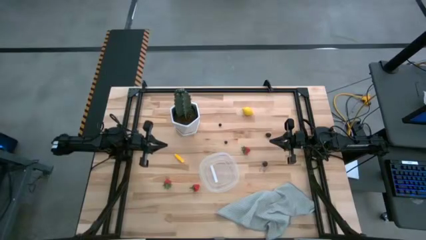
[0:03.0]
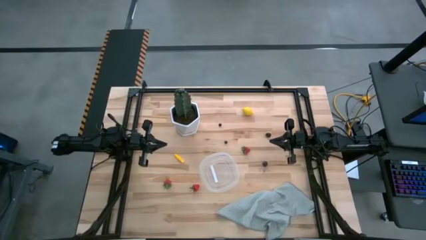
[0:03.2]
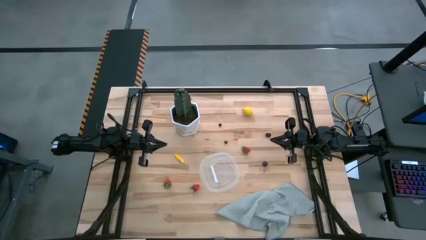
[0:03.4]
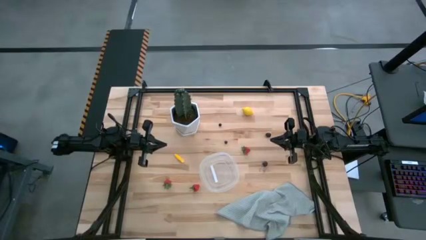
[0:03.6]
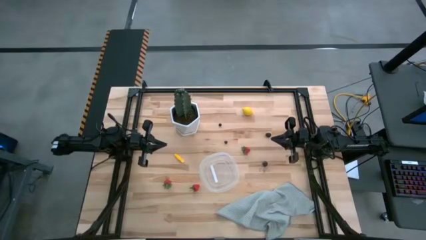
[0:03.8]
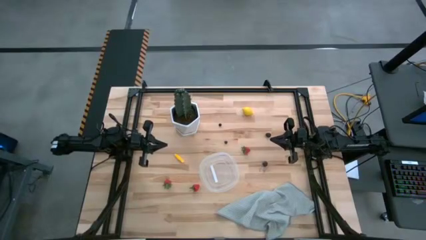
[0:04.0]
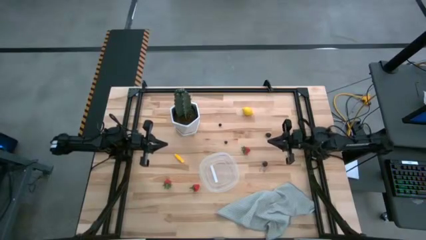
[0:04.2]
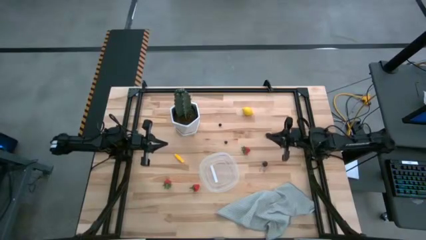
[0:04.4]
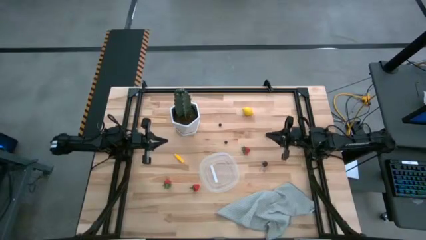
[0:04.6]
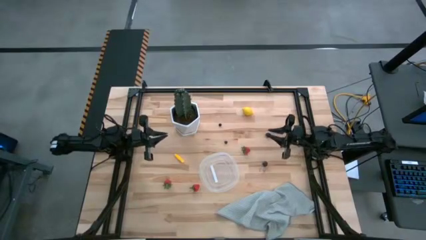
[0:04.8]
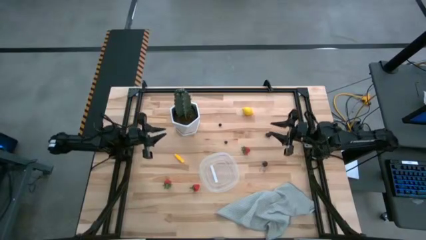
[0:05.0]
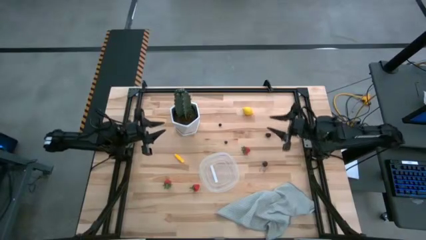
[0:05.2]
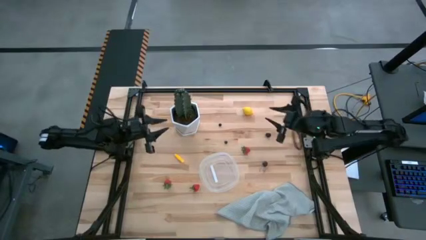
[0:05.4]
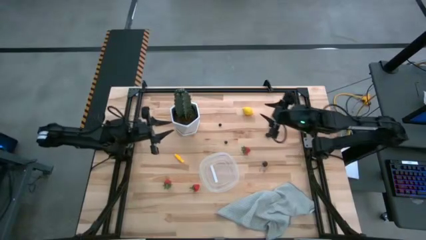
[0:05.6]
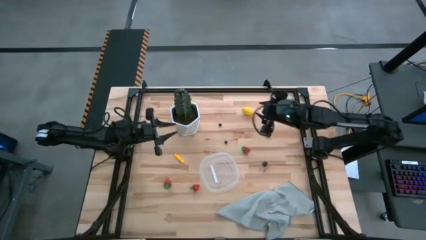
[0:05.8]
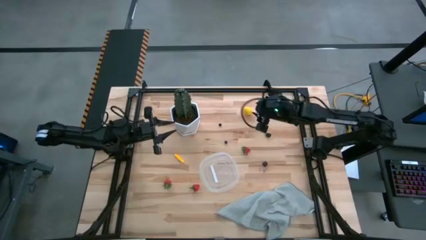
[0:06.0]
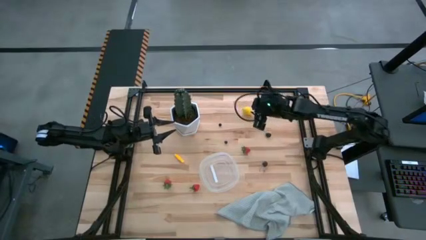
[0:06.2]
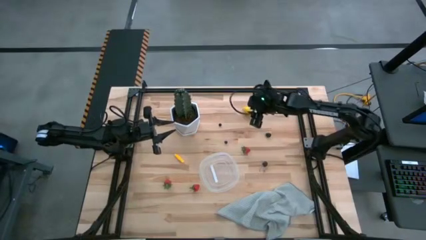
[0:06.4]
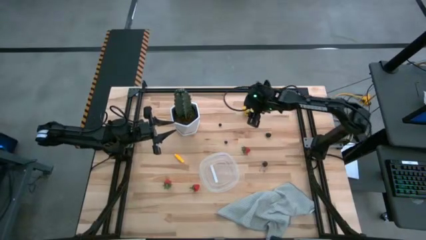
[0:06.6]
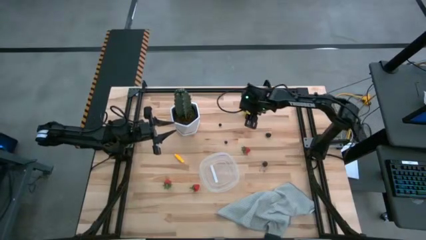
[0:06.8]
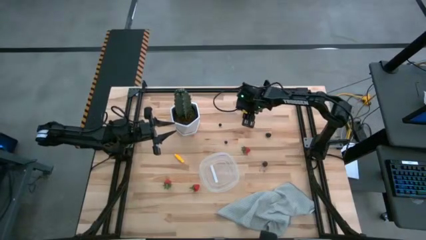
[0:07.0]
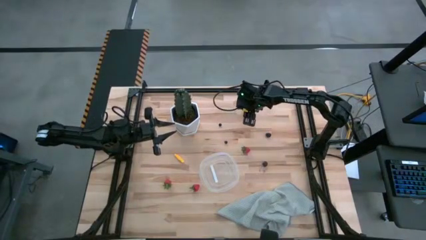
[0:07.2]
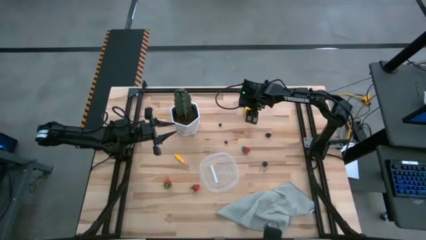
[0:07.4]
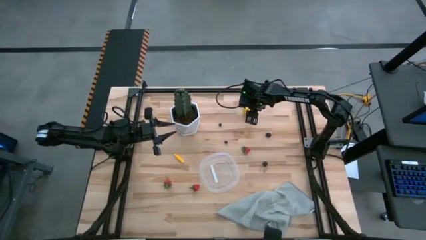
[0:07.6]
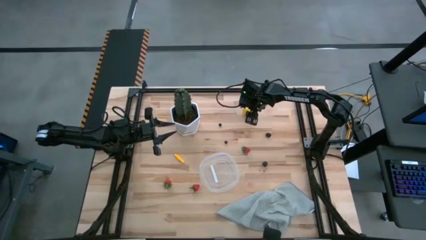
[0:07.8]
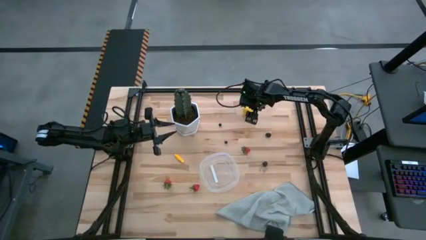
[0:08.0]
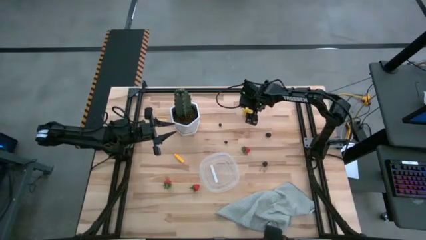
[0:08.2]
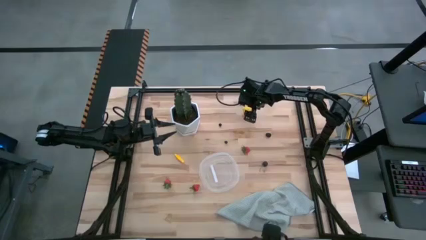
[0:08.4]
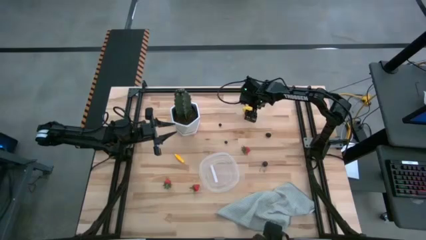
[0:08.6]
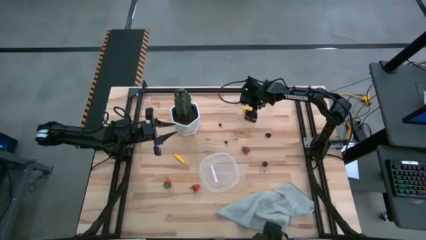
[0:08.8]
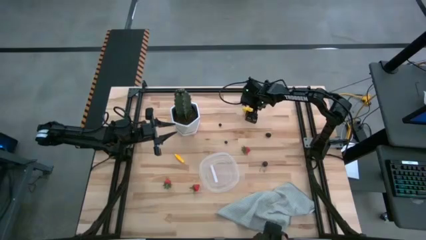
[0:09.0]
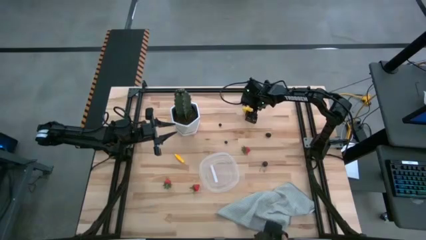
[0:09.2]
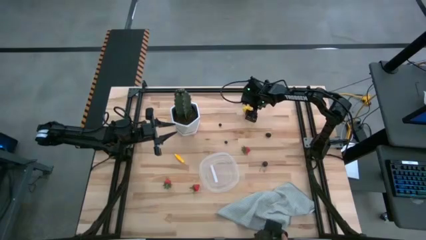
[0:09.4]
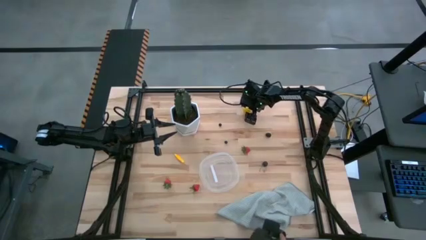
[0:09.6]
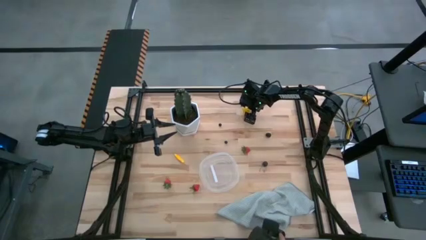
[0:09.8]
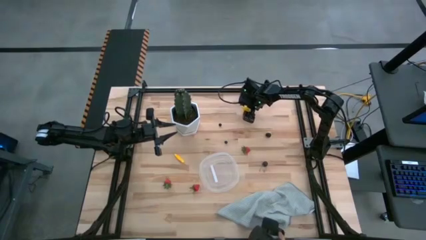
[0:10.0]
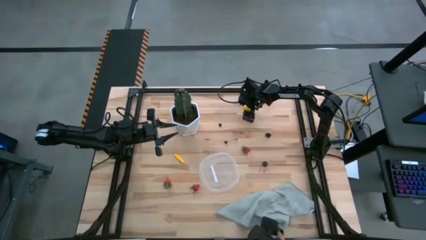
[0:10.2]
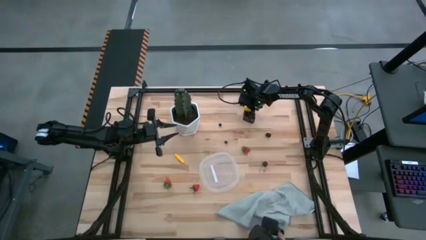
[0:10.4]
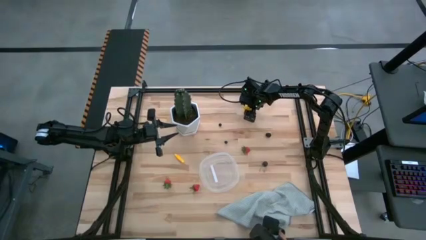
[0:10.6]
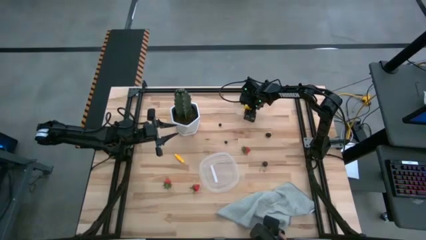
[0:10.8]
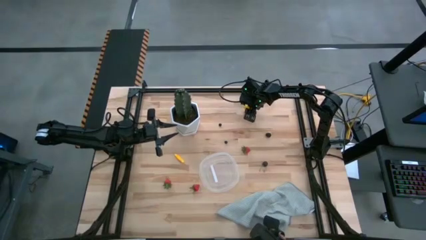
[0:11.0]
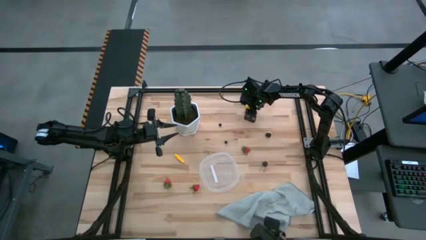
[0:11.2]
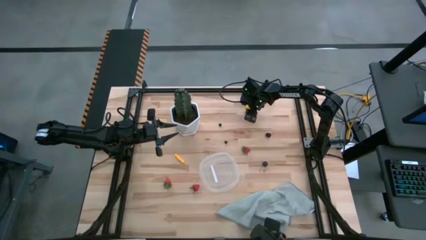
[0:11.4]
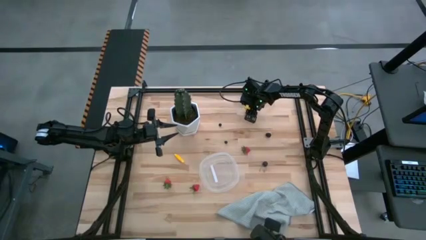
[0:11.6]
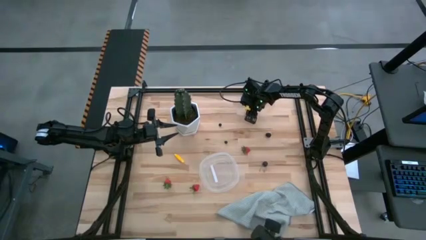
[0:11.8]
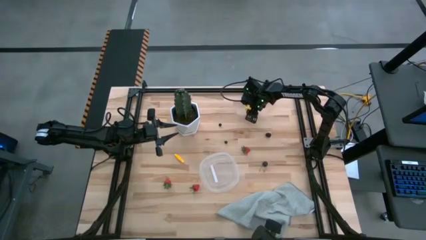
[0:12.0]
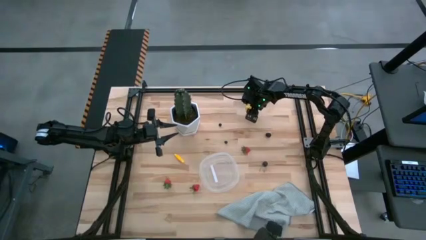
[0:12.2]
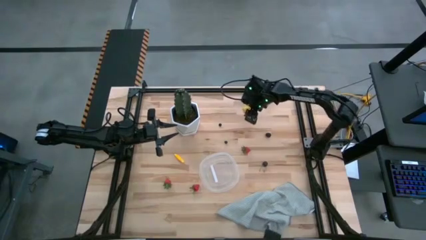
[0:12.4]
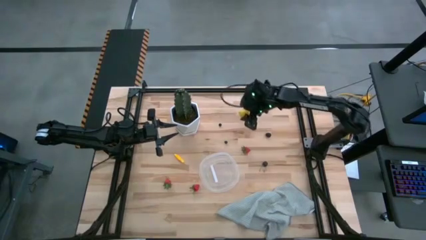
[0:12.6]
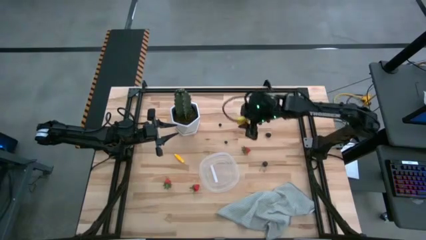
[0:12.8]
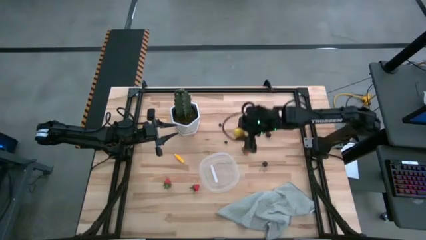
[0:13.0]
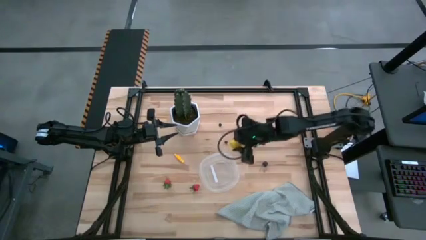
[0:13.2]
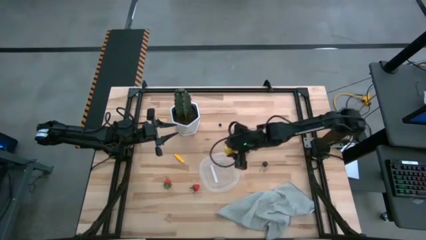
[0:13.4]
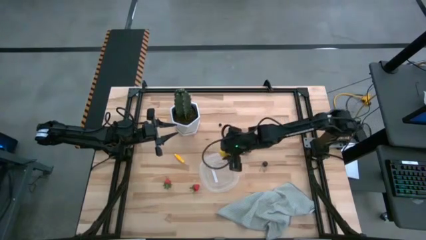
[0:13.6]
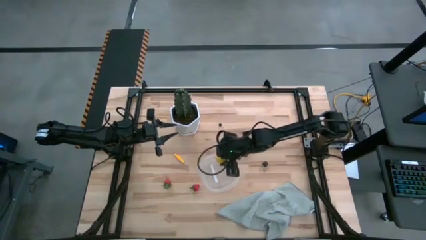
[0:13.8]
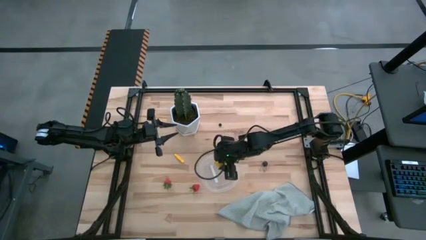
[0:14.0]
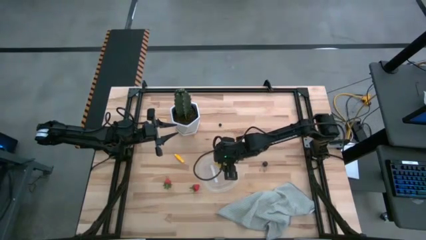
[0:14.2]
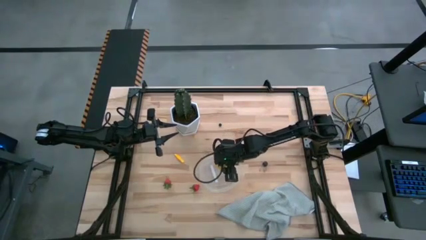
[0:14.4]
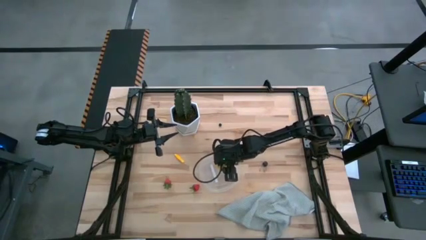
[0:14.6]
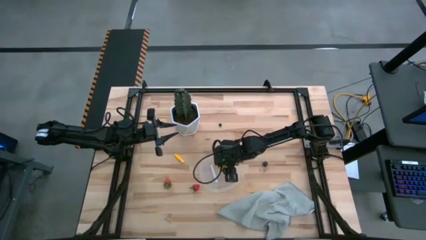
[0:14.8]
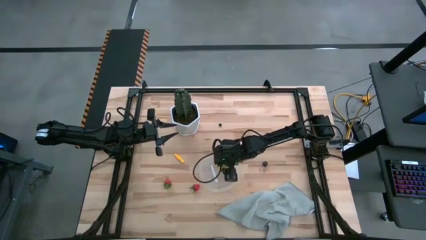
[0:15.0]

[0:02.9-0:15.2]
Task: Pick and placing Produce into tupperware
Put the yellow lemon into the transparent container

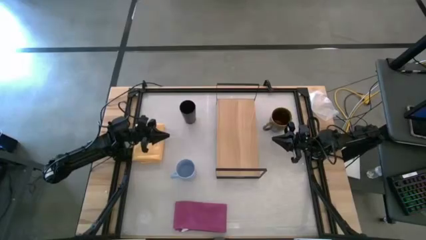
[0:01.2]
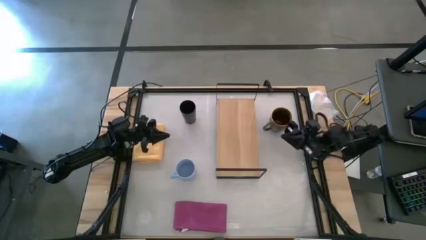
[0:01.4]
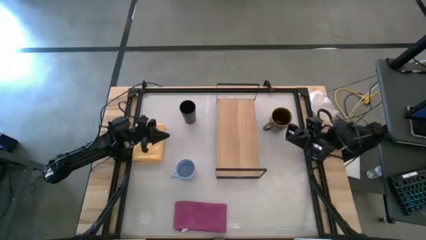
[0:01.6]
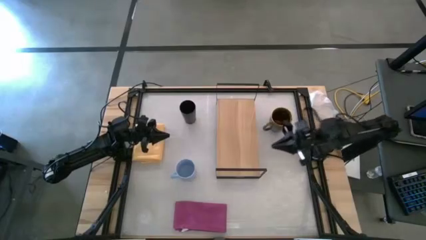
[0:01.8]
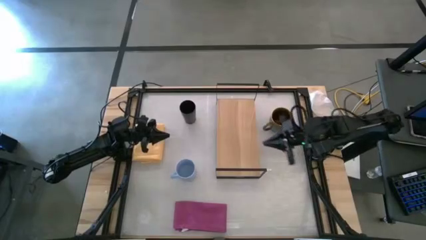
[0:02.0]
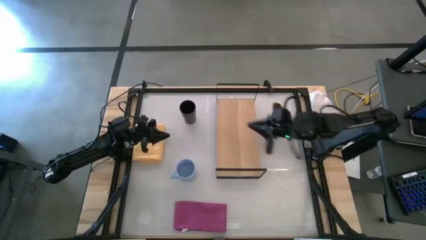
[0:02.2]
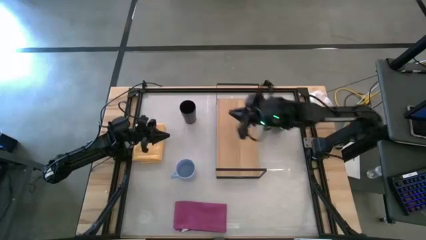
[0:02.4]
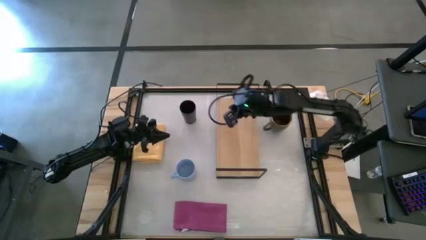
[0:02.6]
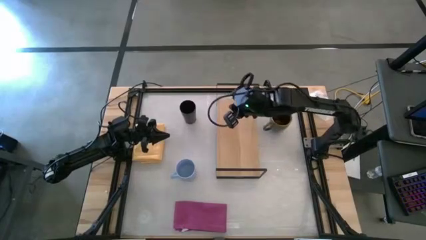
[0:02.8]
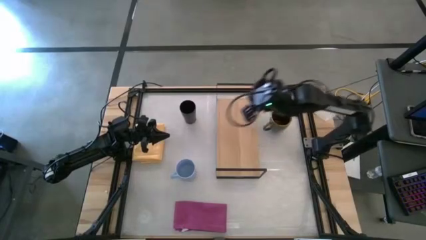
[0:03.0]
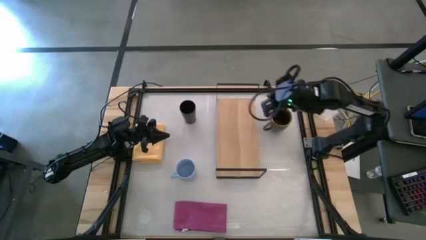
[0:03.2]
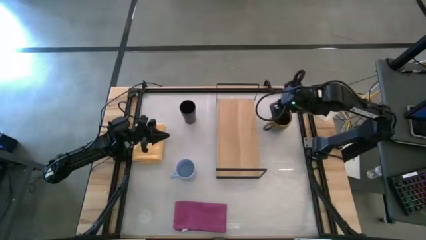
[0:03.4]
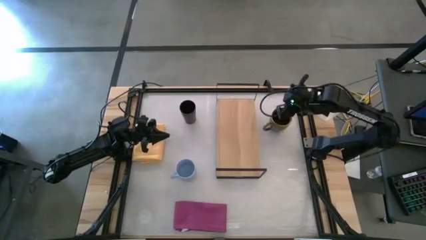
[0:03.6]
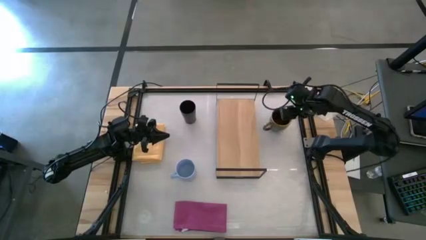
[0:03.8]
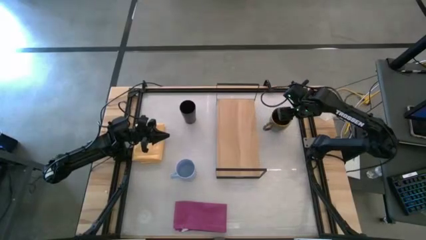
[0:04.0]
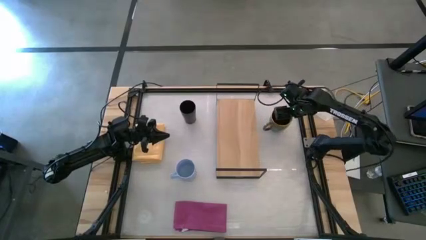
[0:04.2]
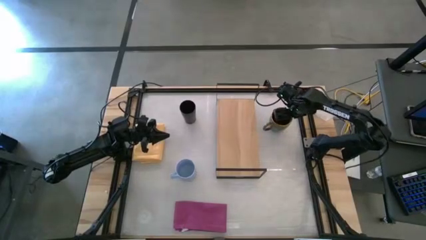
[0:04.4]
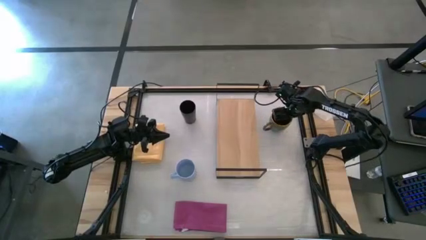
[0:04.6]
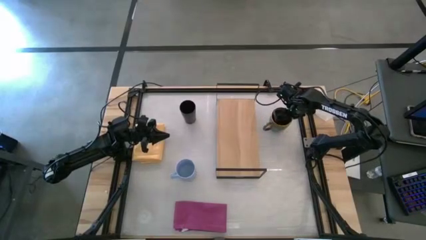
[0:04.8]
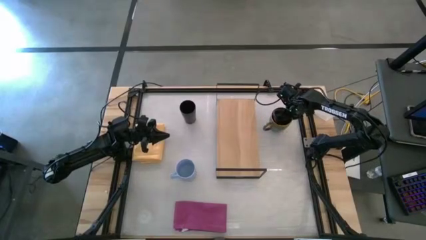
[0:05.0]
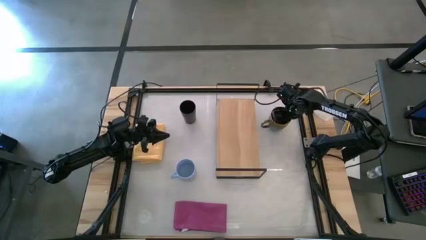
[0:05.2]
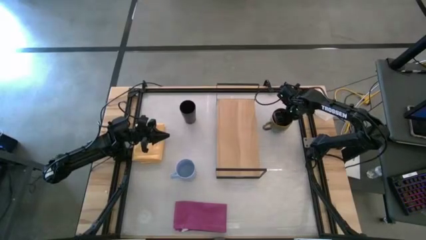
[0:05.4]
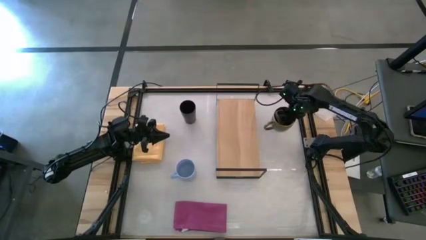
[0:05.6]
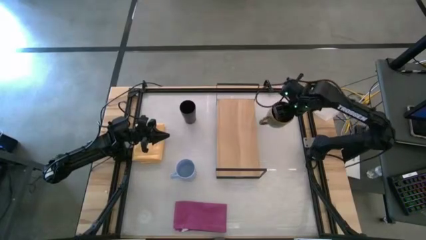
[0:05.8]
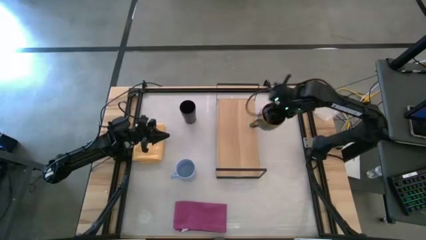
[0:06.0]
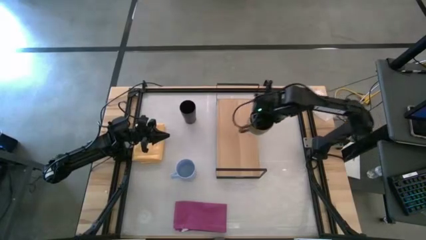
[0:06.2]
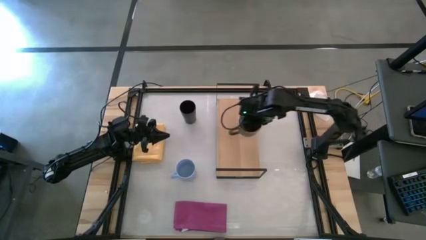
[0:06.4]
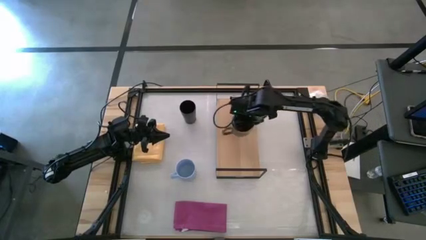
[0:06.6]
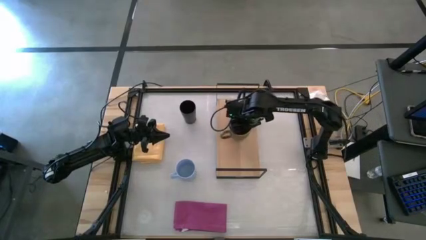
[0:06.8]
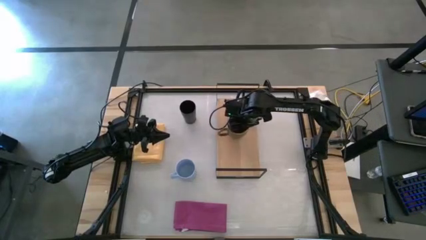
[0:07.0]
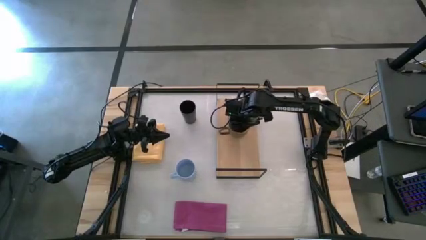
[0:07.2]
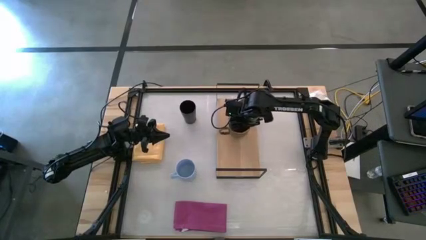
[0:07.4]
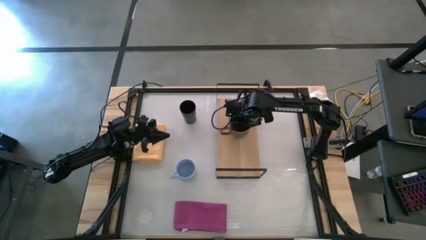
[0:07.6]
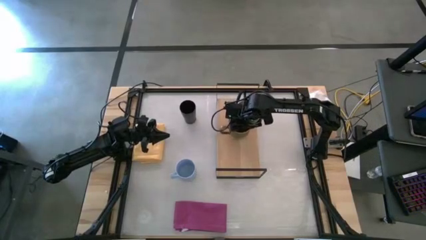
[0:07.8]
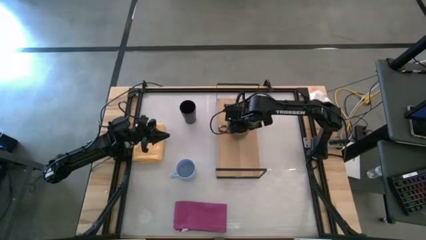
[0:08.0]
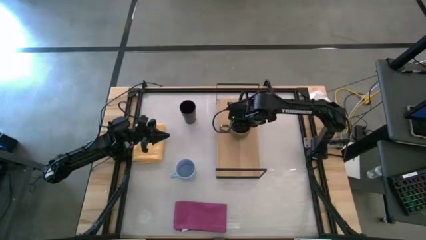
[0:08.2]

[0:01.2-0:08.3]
Task: Stack small to large cups/mugs on shelf
Put the dark green mug on the shelf
